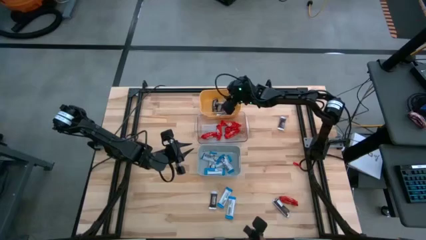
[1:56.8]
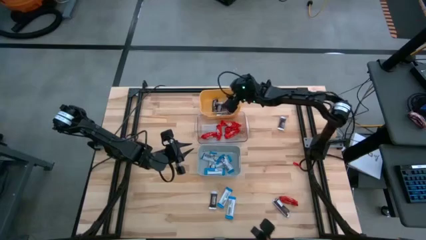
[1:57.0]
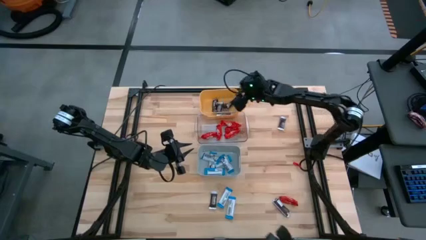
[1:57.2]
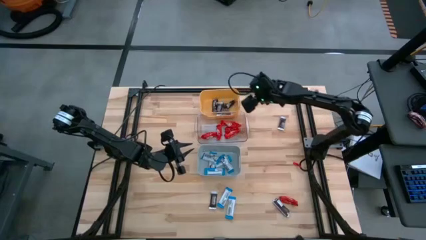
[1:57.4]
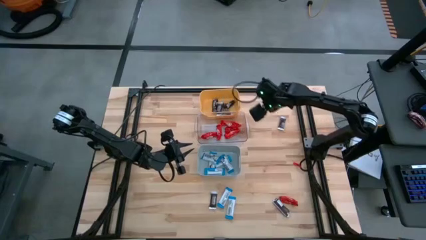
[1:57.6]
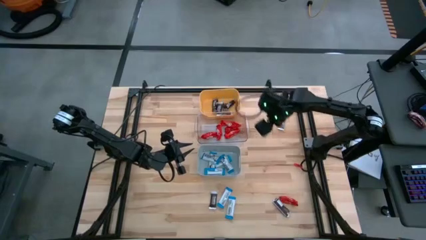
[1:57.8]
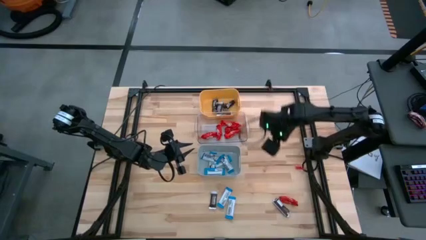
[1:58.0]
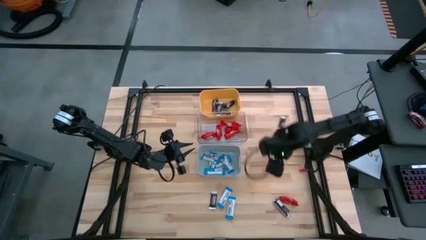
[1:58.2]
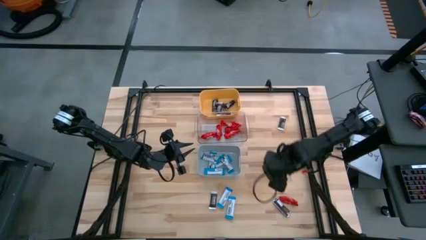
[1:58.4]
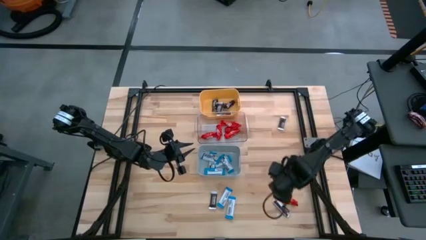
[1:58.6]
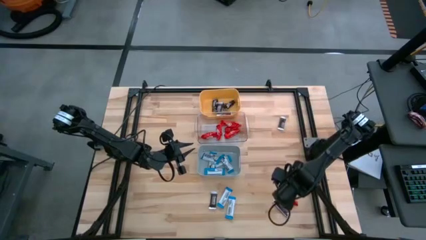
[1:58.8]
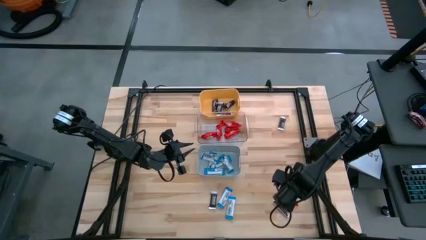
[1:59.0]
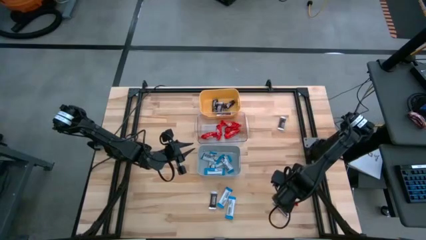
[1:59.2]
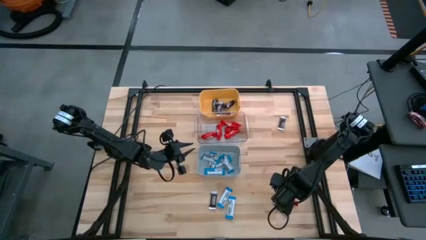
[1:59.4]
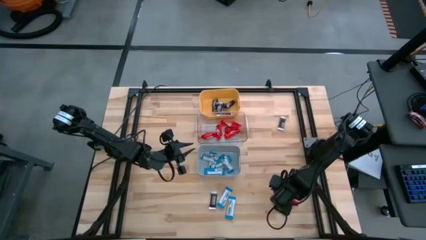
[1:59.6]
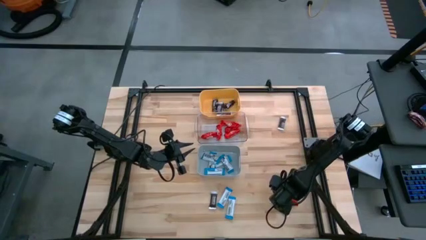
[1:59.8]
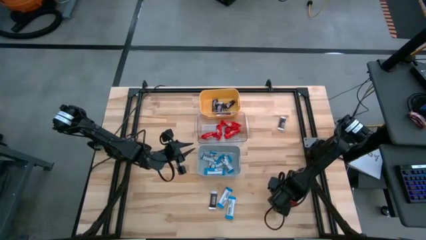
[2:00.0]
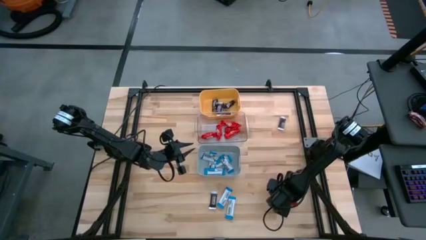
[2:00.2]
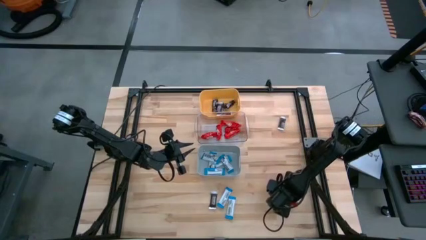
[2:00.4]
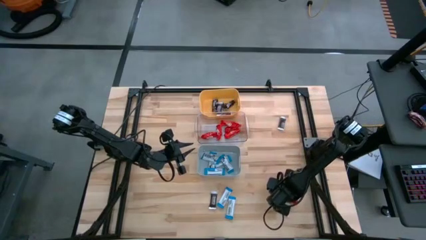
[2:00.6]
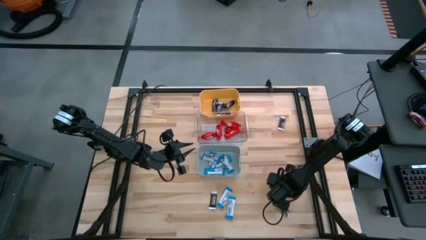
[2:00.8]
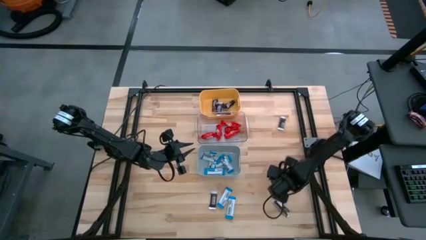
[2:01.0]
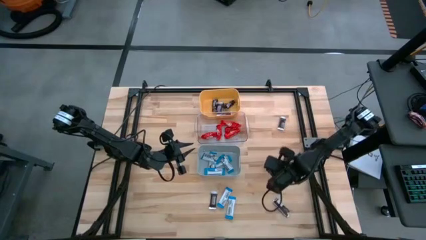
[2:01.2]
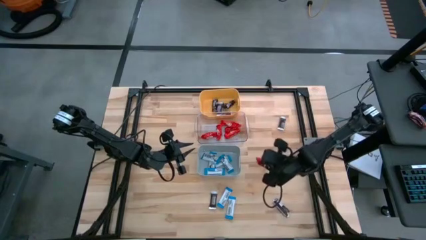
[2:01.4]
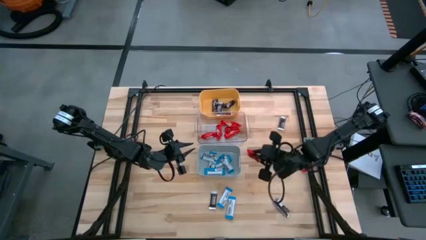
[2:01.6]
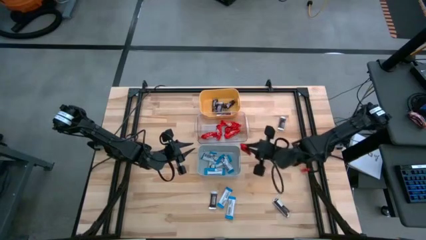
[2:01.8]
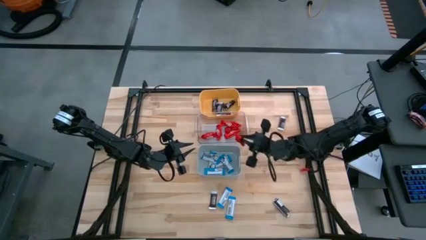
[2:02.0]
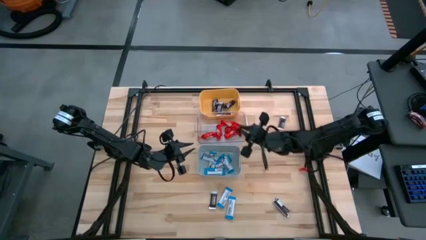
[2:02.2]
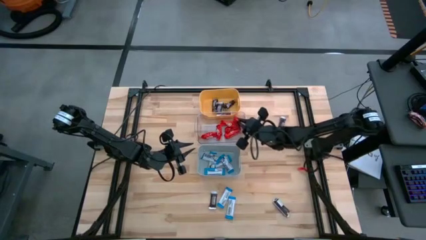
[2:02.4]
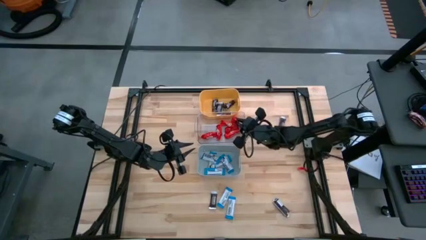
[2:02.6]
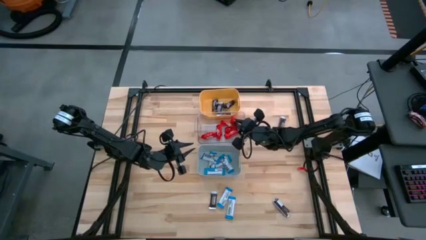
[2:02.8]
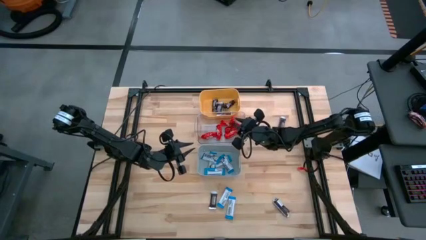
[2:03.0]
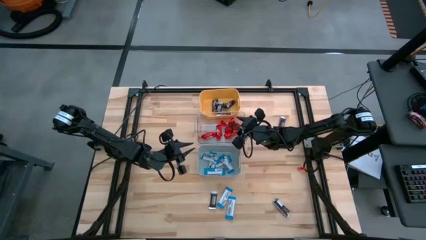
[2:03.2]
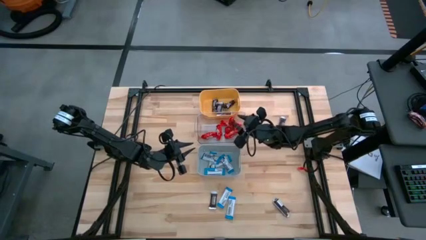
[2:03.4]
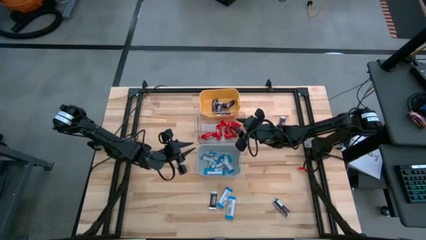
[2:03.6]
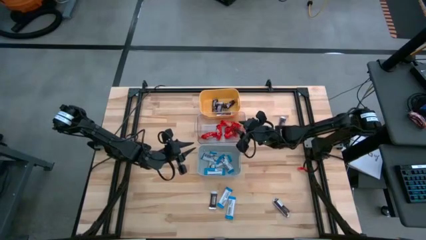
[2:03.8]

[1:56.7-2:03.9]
Task: Organize candy in baskets
Put the red chocolate bar into the transparent bin

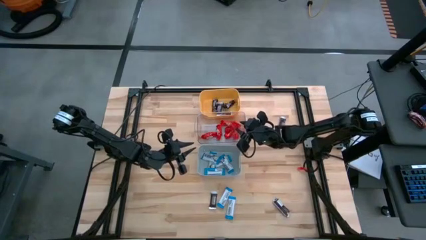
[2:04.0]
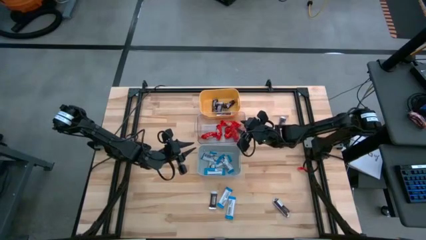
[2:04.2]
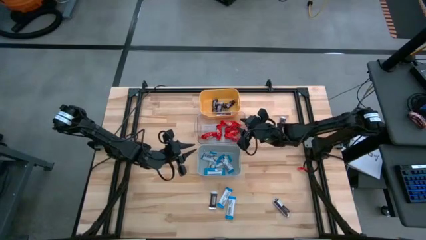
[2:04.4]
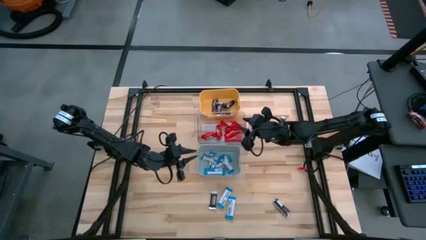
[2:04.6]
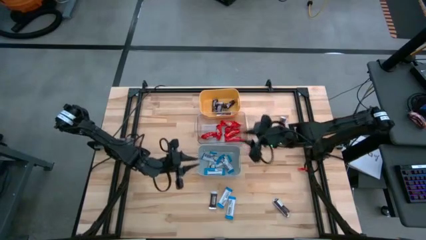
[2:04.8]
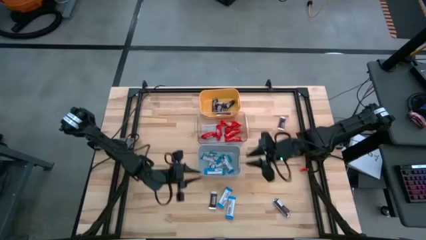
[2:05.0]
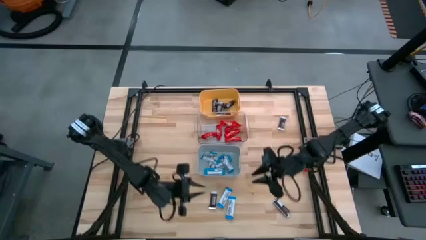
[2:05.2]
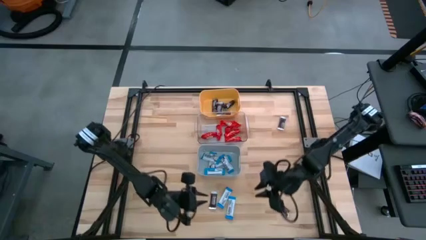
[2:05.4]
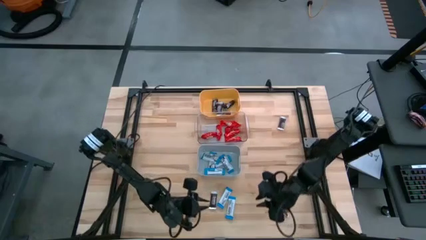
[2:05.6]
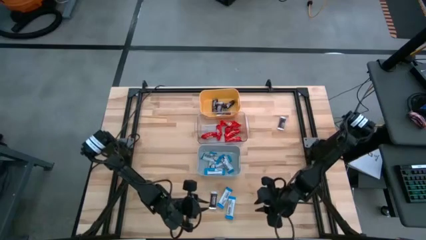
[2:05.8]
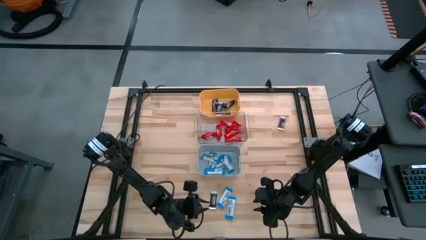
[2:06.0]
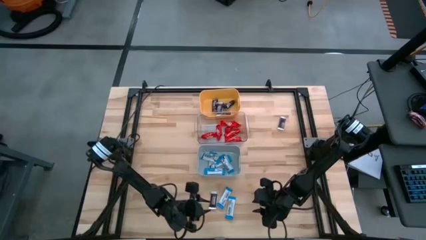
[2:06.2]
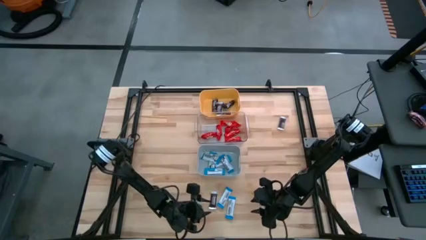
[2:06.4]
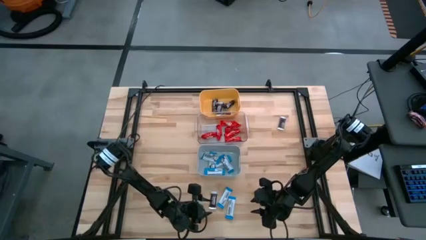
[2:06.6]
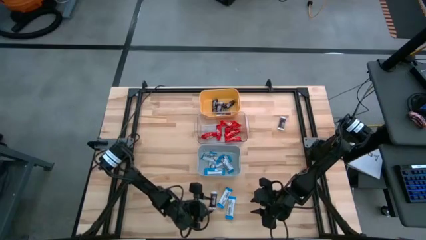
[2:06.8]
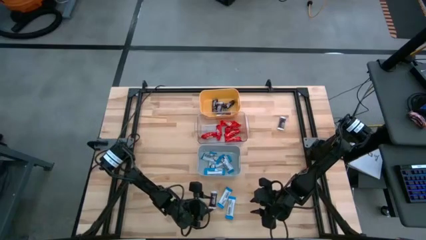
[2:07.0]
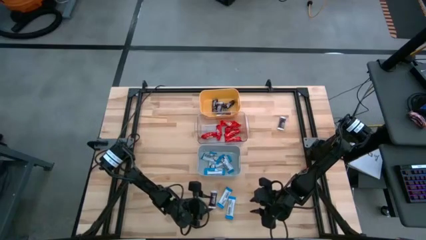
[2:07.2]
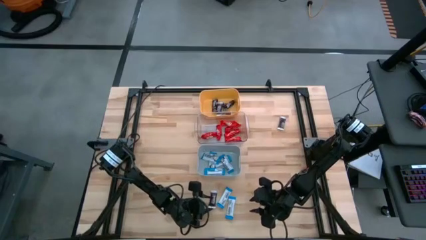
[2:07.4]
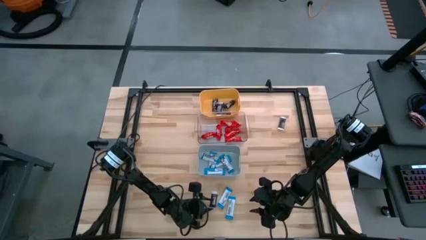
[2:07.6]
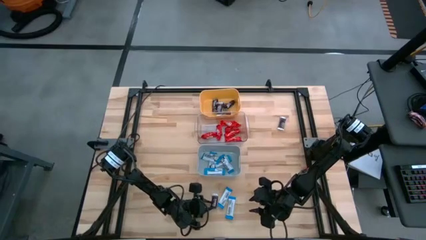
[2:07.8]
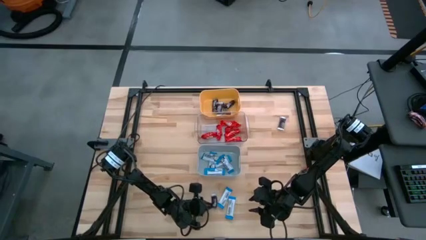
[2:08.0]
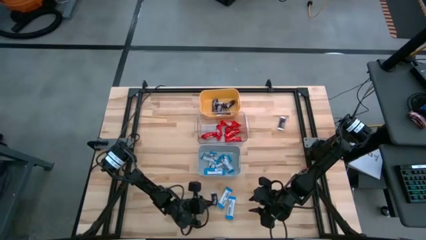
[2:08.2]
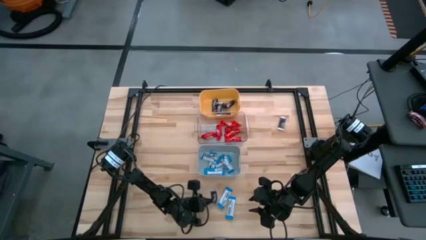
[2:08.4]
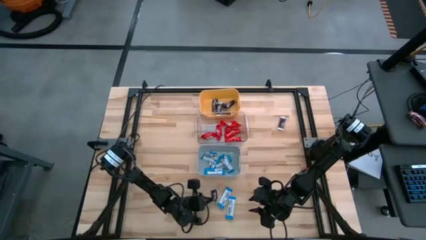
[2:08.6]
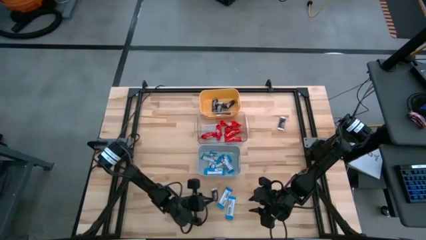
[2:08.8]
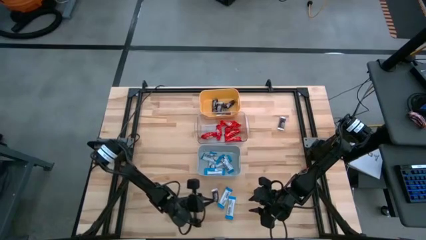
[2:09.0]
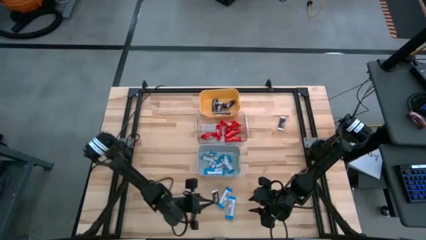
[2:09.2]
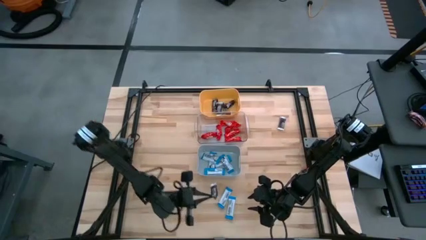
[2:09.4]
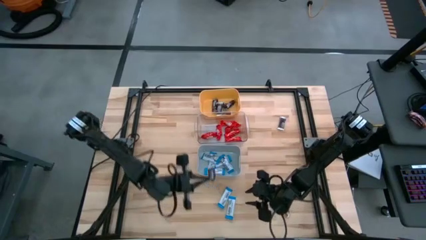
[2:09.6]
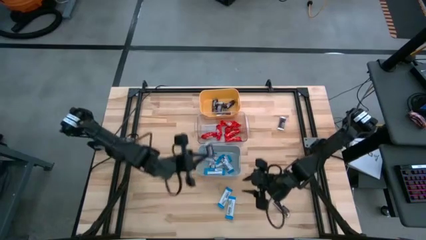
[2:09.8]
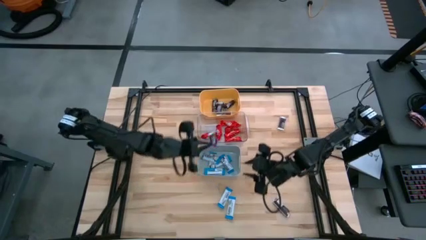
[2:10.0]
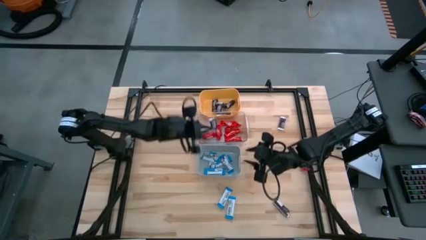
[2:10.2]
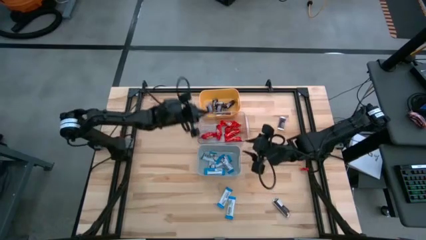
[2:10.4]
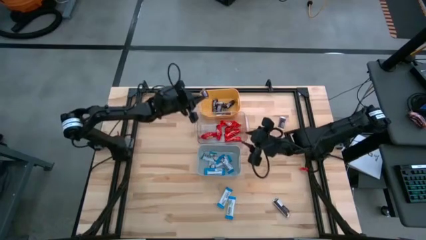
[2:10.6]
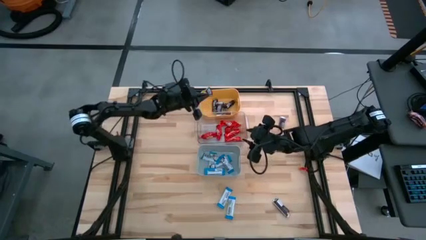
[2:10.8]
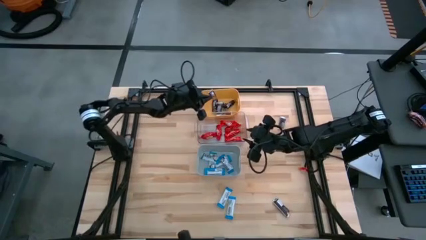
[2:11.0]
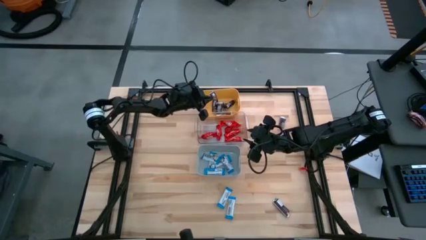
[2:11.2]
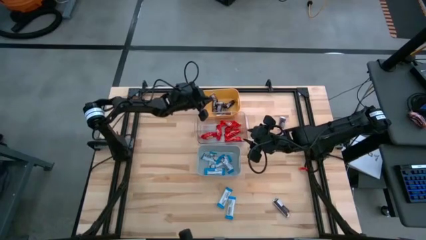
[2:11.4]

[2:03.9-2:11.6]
Put the brown chocolate bar into the yellow bin

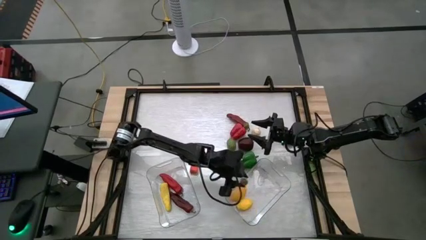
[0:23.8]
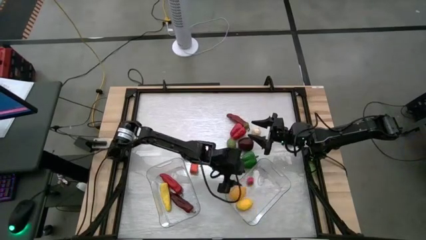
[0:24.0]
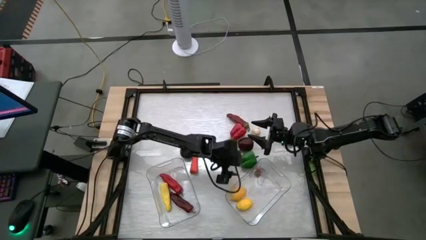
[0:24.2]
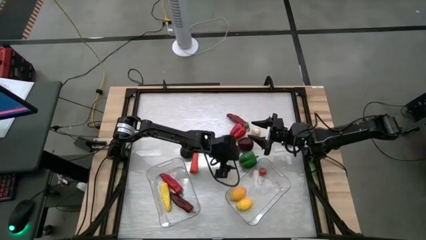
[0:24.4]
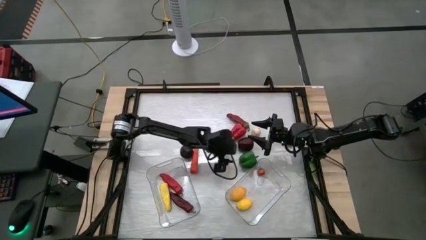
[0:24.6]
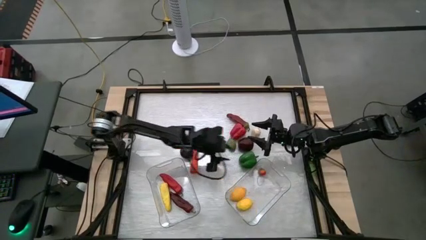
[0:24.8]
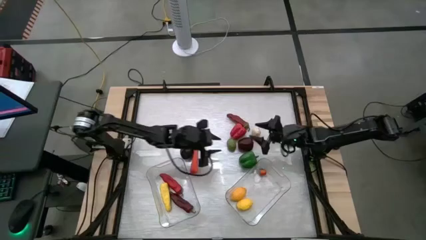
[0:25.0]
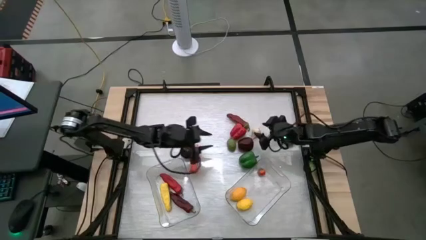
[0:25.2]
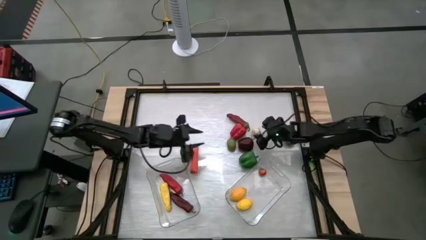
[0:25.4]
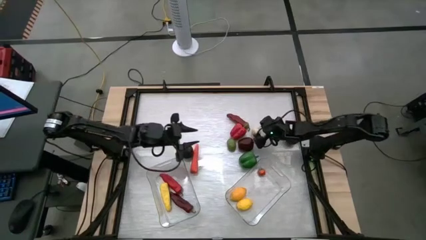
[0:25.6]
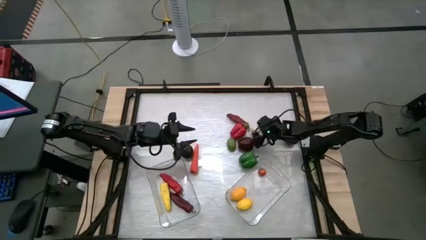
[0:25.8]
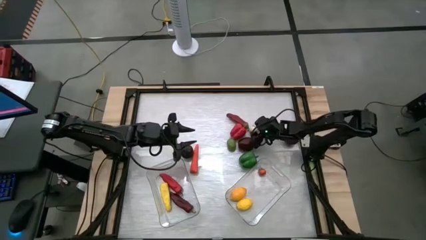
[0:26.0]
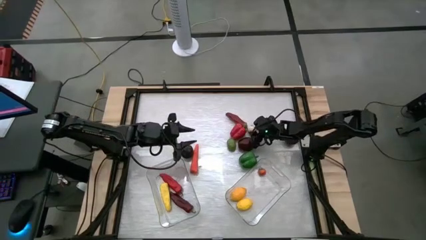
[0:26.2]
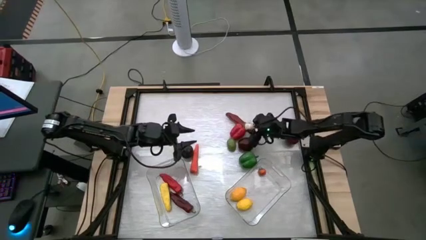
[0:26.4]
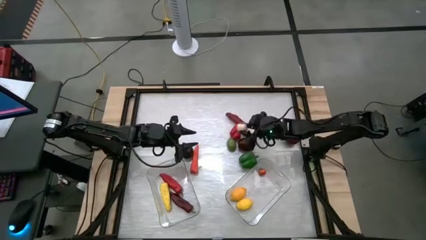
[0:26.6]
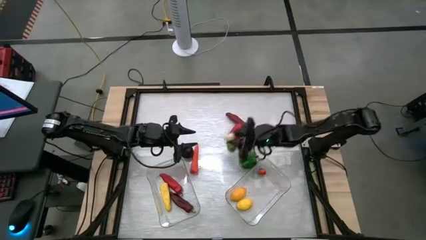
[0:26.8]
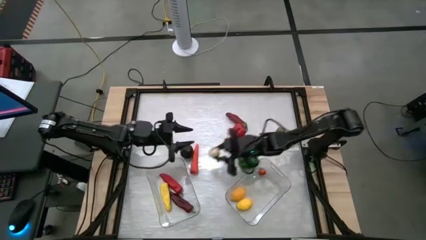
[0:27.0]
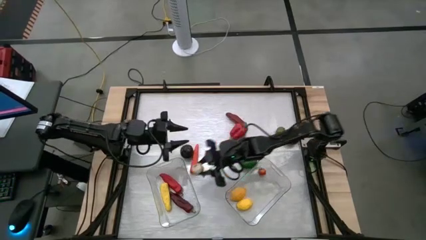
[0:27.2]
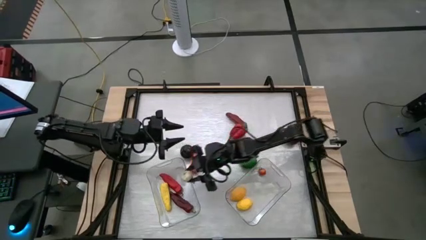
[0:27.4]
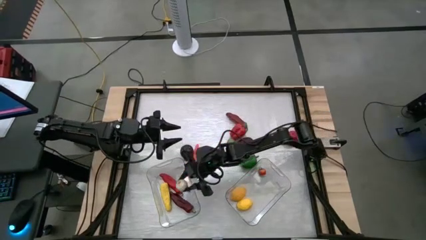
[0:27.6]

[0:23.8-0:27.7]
Task: Sort produce into baskets
Put the garlic into the left transparent bin
